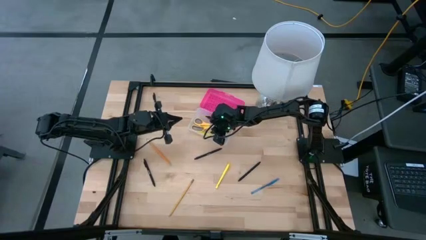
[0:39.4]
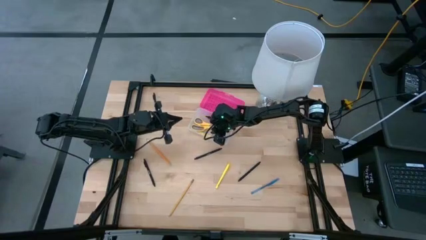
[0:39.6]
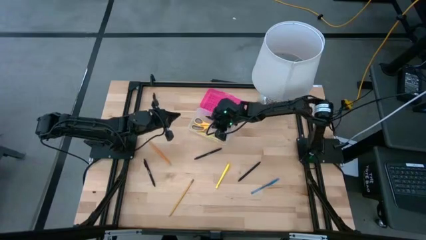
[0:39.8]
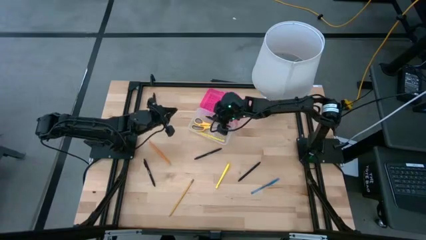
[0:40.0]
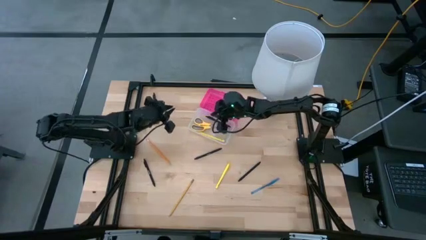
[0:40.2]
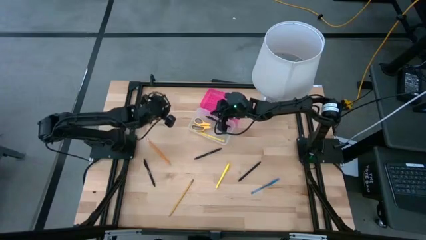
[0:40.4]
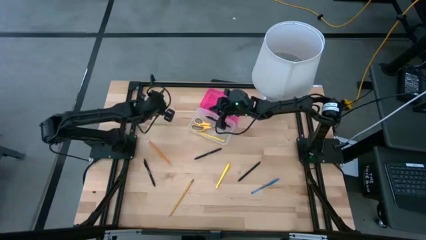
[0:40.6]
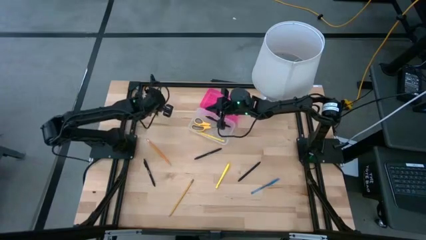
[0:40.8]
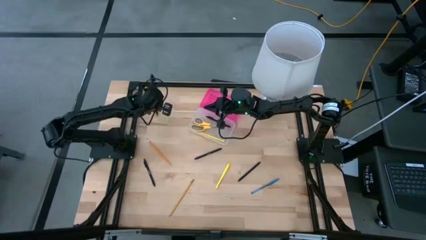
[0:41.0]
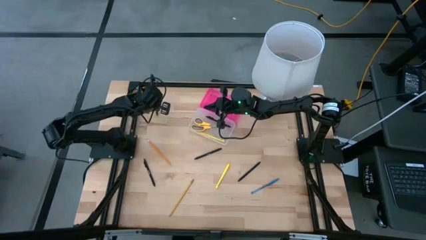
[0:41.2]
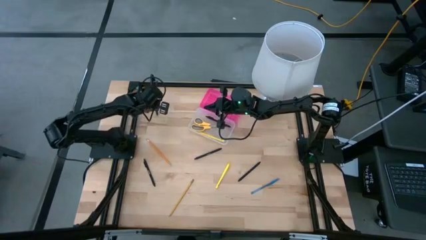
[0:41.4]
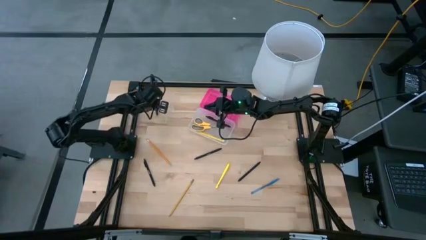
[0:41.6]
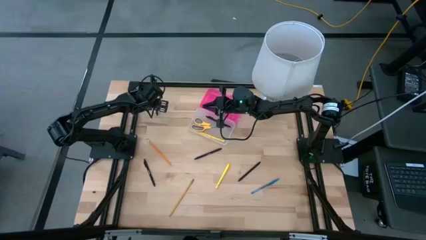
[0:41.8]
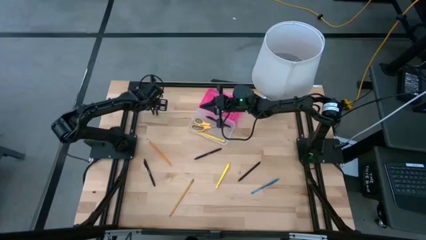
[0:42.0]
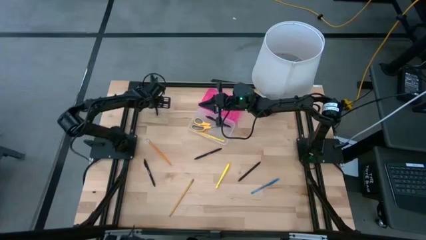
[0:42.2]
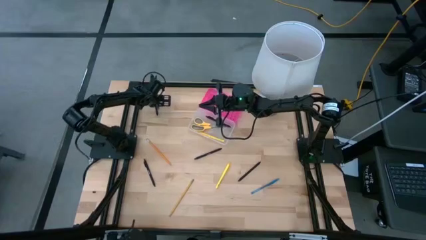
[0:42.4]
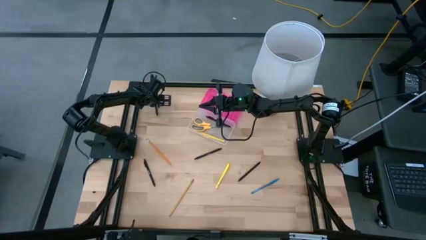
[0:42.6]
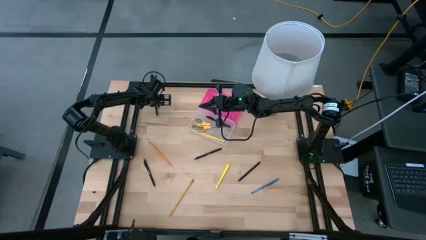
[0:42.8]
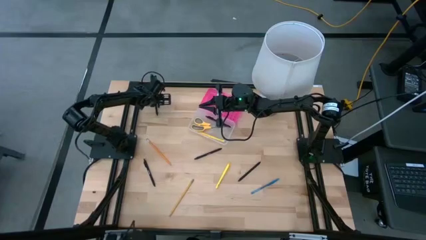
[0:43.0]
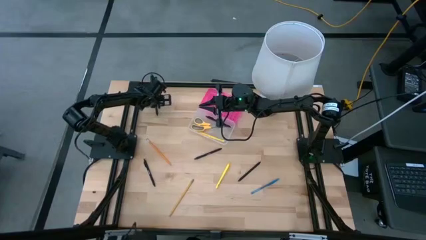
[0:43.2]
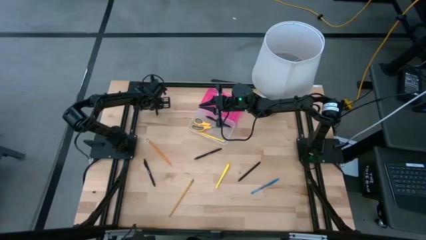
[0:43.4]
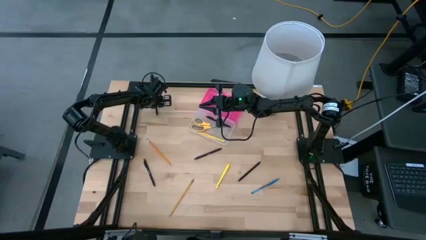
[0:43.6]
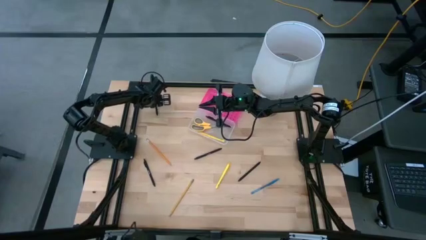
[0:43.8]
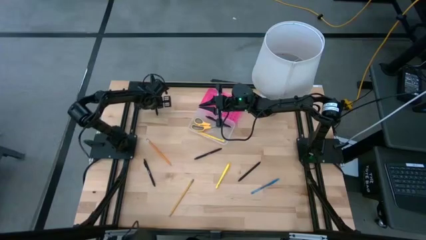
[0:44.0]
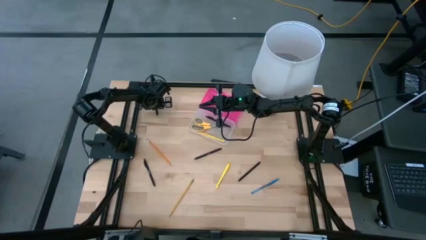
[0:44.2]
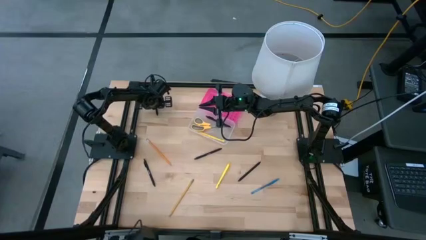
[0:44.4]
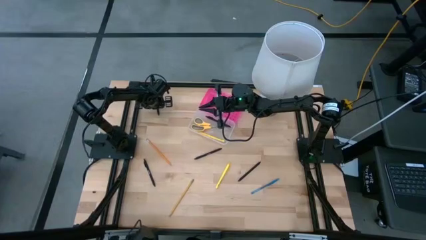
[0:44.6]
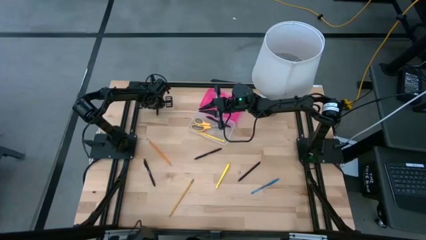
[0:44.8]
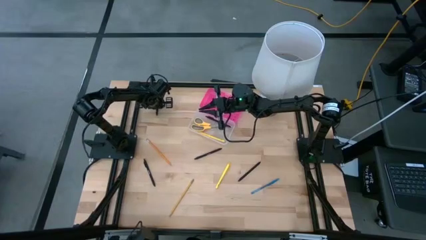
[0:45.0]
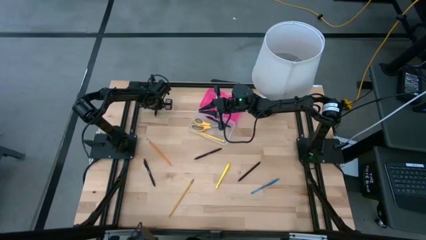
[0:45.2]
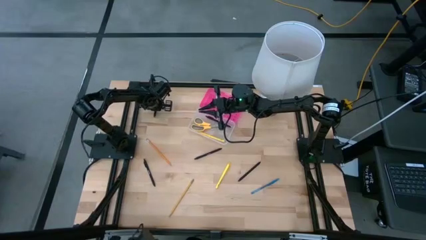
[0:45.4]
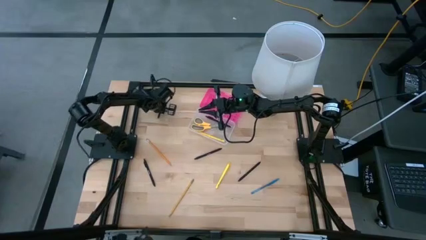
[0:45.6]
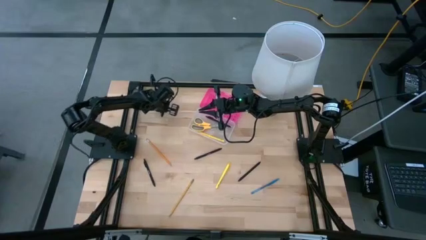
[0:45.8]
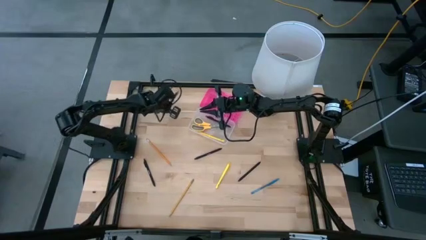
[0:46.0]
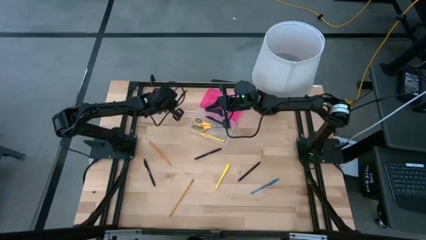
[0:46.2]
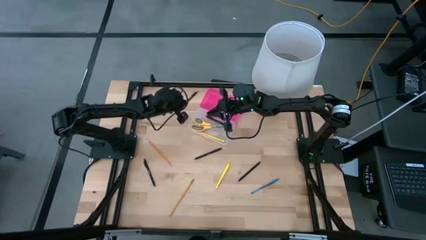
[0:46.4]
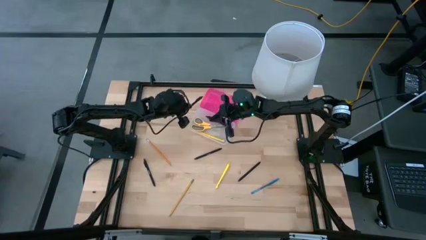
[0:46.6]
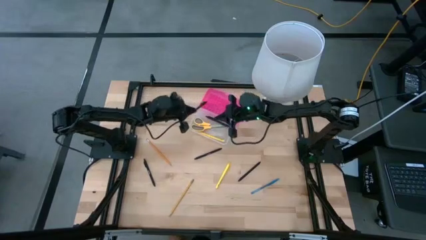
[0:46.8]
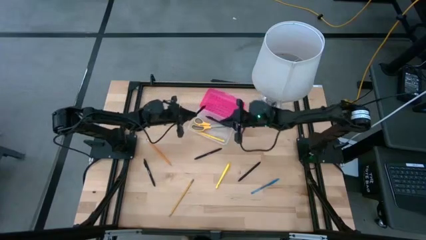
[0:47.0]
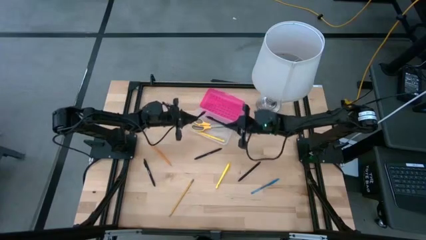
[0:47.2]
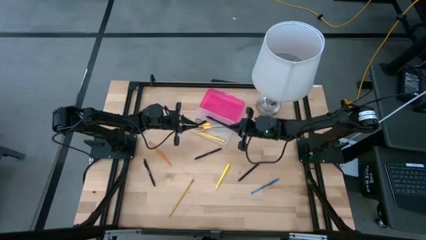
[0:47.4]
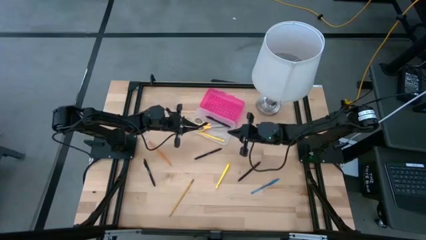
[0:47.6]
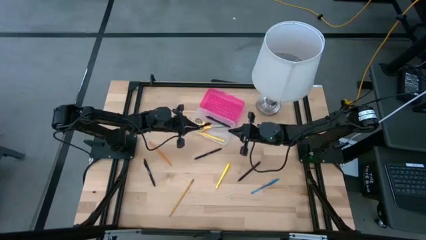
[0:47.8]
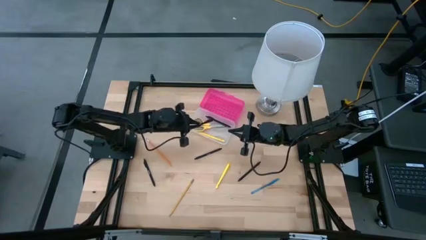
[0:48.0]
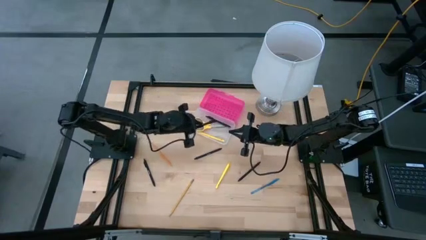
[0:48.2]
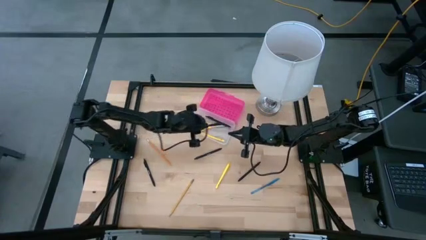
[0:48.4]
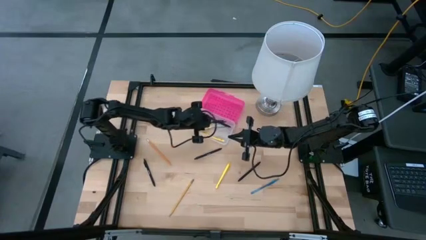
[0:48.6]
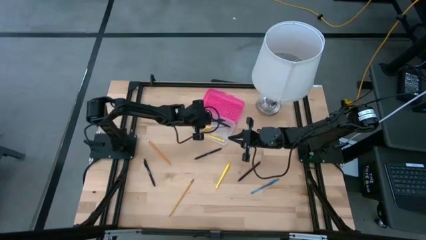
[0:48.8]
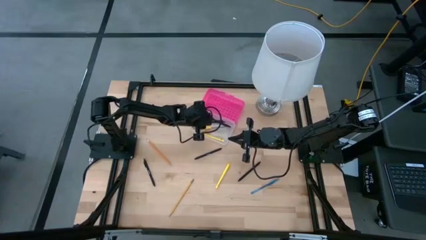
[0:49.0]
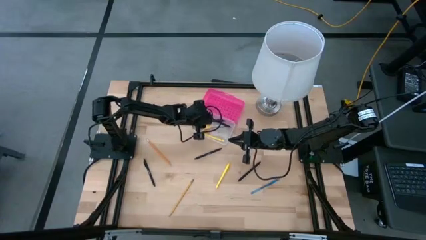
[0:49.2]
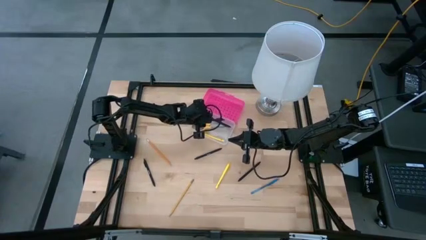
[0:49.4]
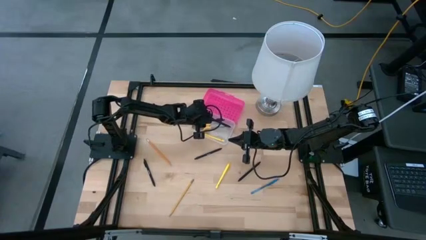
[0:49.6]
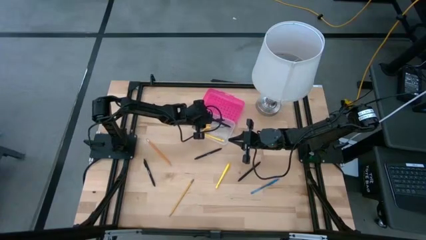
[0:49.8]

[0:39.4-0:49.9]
Task: Pick & place school supplies into a supply box
Put the black pen into the pink supply box
